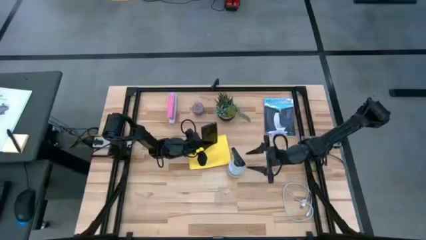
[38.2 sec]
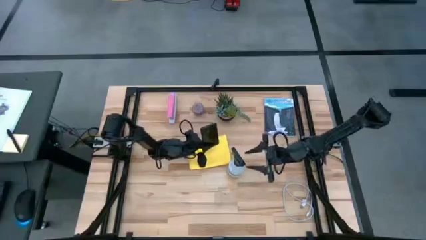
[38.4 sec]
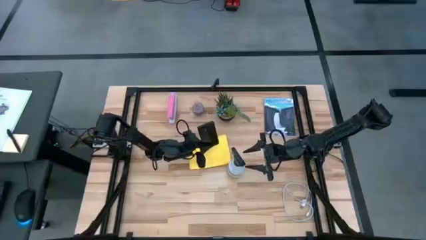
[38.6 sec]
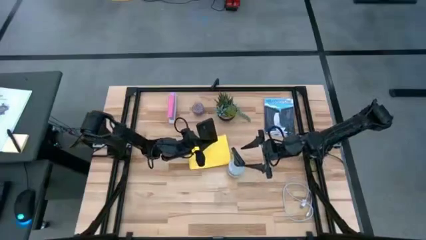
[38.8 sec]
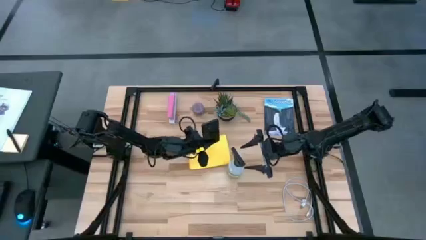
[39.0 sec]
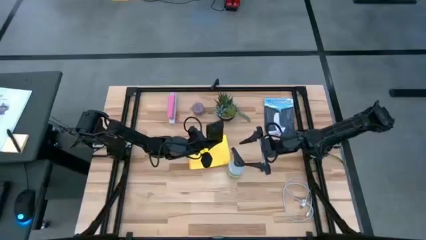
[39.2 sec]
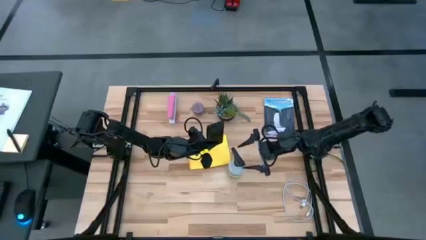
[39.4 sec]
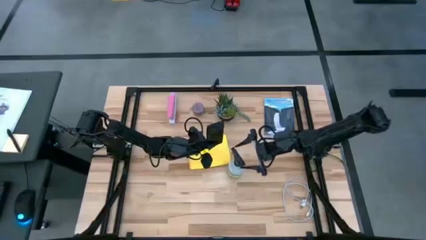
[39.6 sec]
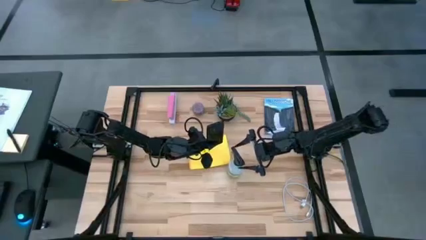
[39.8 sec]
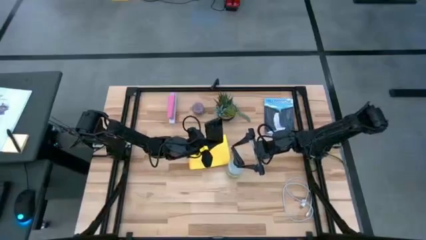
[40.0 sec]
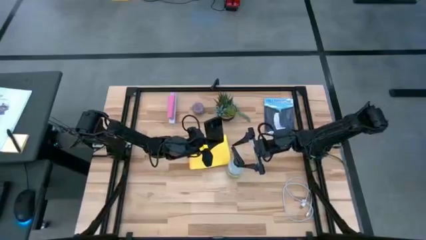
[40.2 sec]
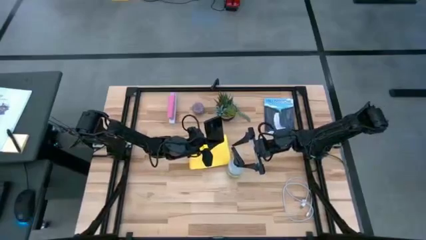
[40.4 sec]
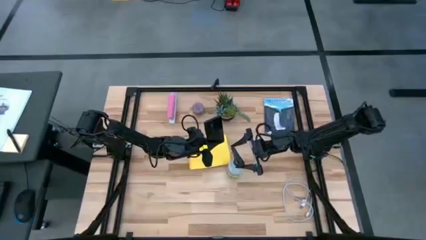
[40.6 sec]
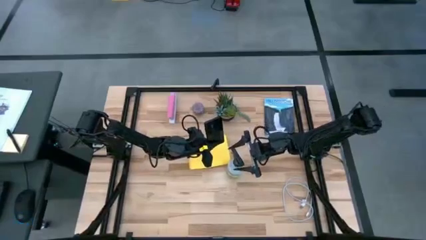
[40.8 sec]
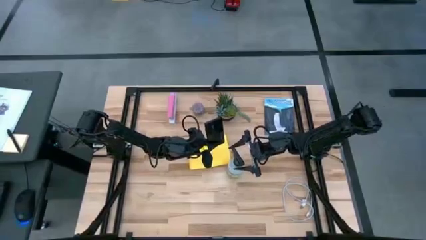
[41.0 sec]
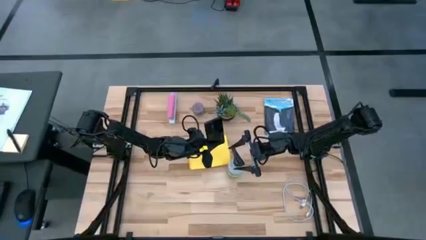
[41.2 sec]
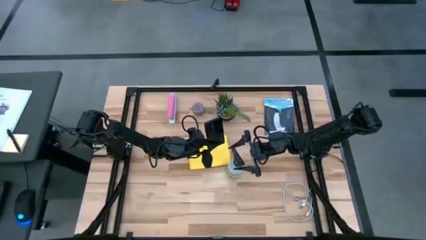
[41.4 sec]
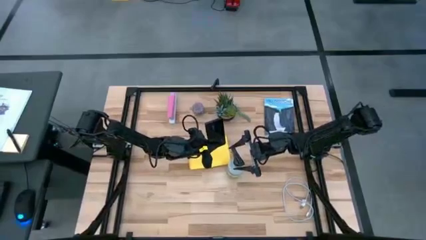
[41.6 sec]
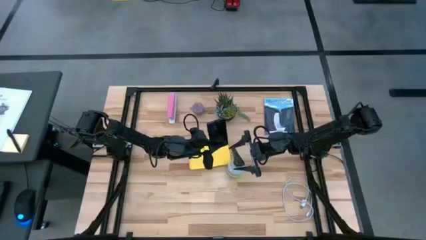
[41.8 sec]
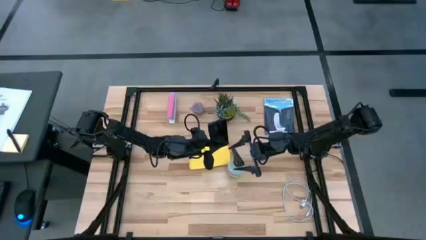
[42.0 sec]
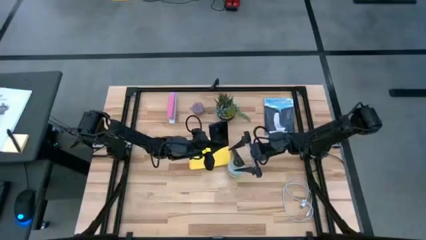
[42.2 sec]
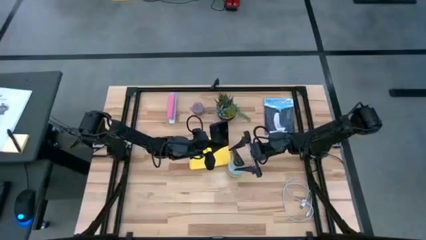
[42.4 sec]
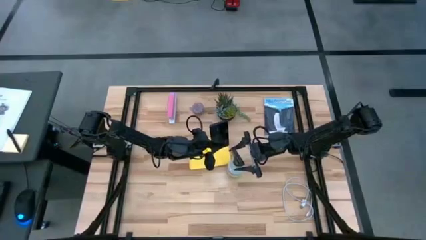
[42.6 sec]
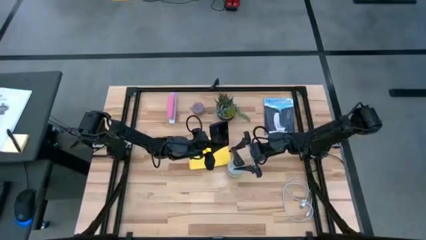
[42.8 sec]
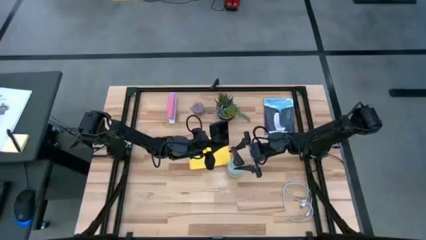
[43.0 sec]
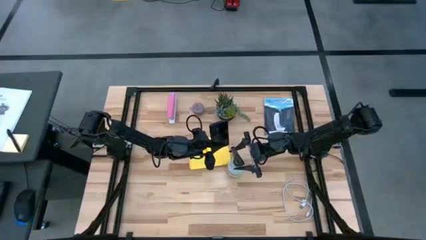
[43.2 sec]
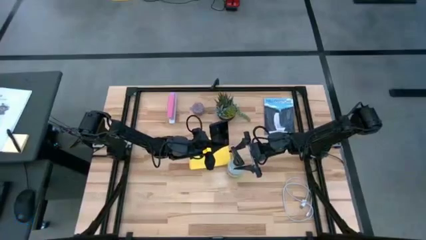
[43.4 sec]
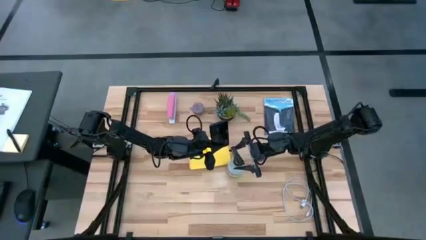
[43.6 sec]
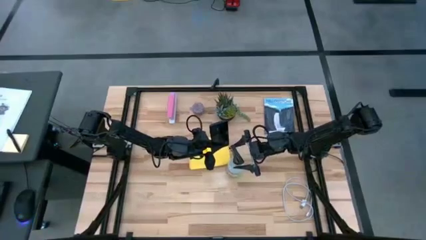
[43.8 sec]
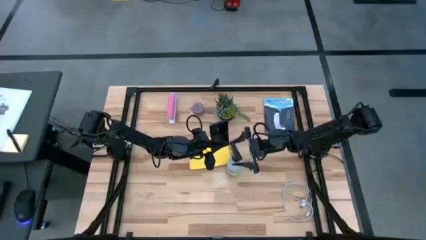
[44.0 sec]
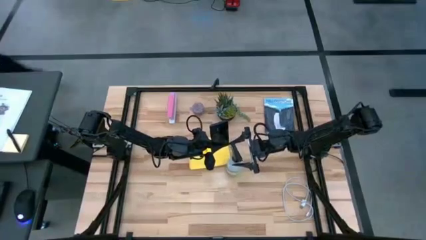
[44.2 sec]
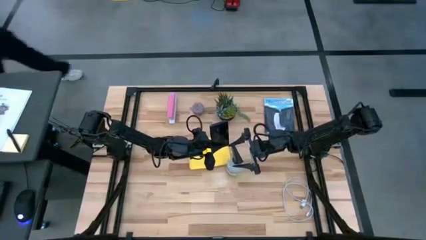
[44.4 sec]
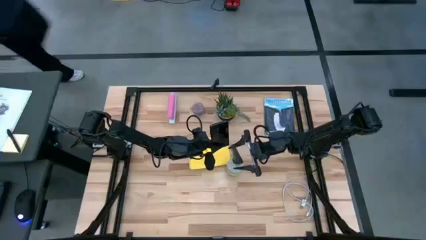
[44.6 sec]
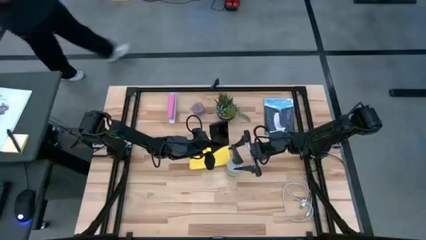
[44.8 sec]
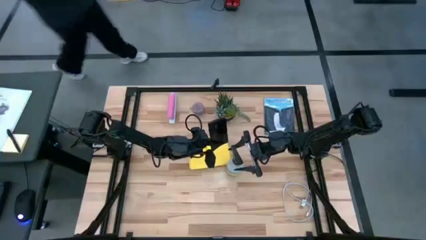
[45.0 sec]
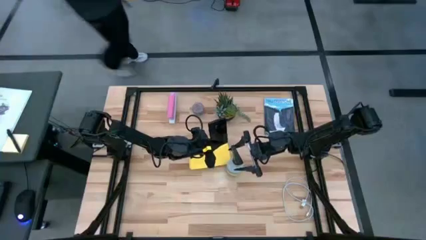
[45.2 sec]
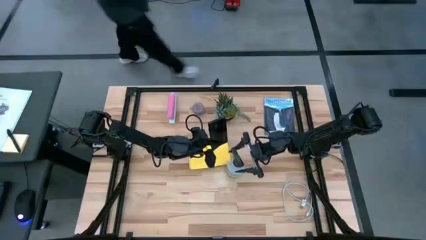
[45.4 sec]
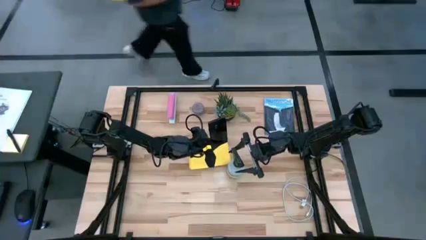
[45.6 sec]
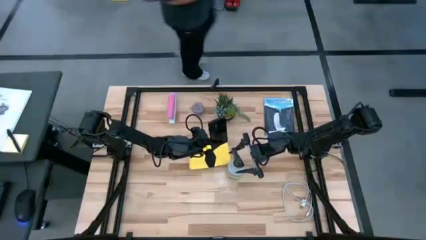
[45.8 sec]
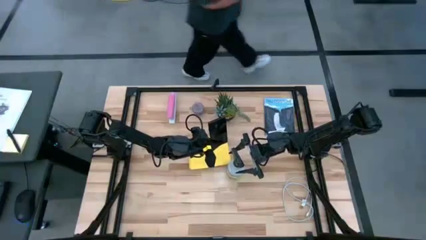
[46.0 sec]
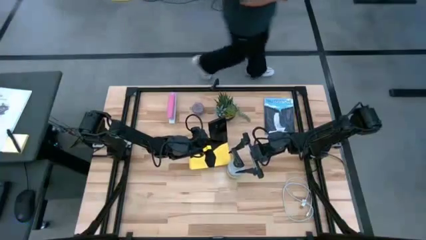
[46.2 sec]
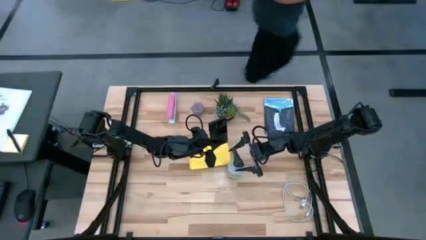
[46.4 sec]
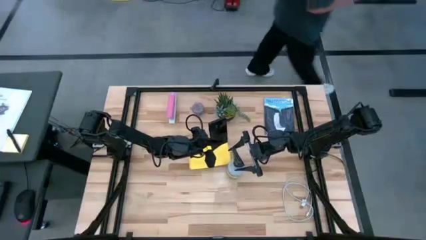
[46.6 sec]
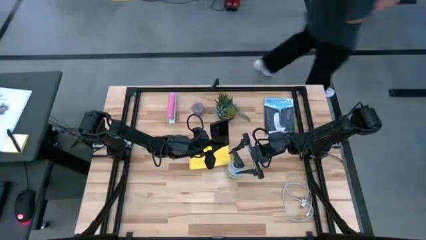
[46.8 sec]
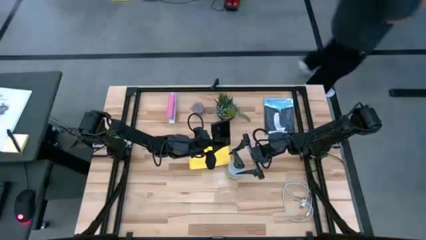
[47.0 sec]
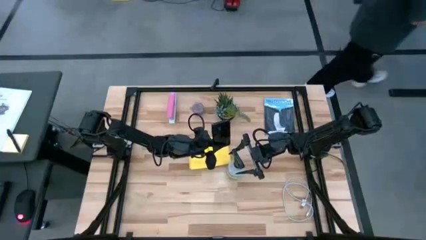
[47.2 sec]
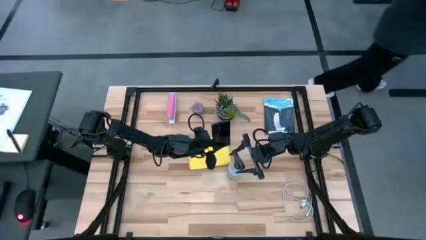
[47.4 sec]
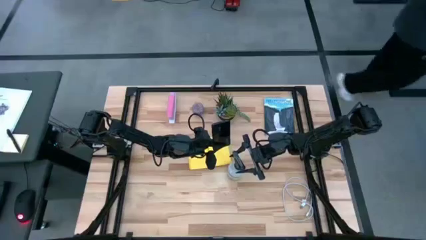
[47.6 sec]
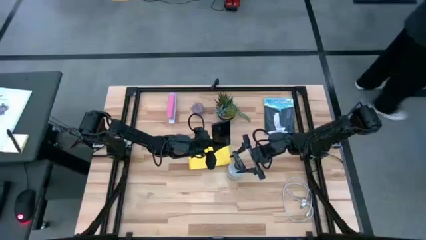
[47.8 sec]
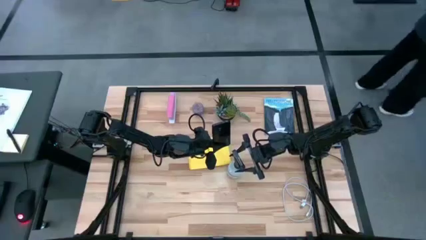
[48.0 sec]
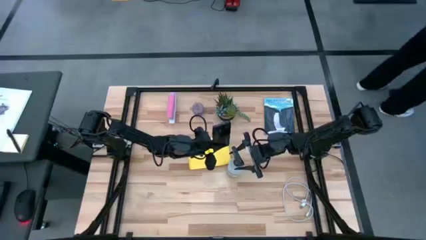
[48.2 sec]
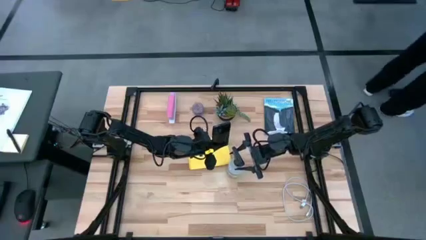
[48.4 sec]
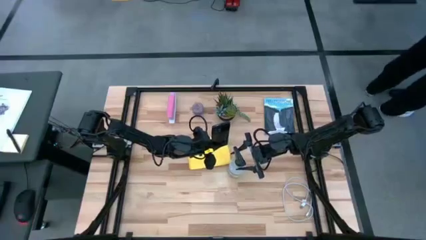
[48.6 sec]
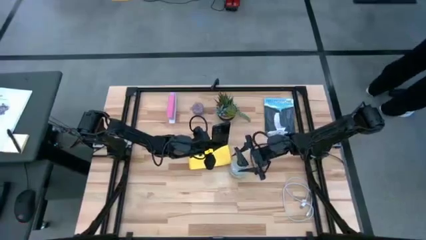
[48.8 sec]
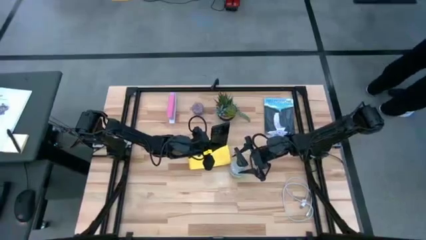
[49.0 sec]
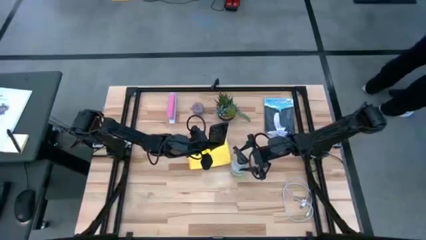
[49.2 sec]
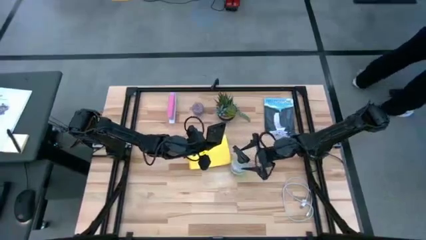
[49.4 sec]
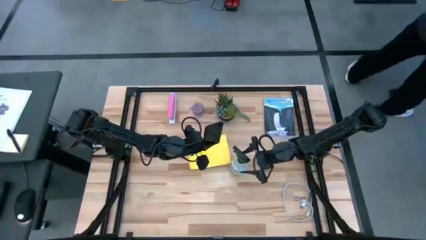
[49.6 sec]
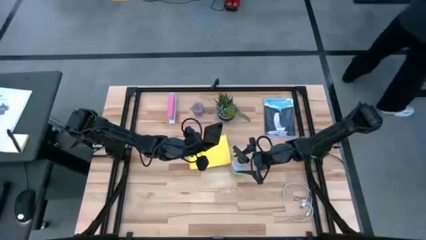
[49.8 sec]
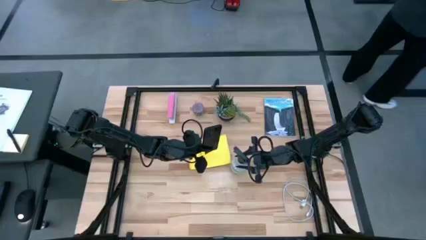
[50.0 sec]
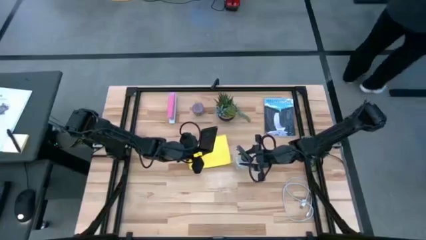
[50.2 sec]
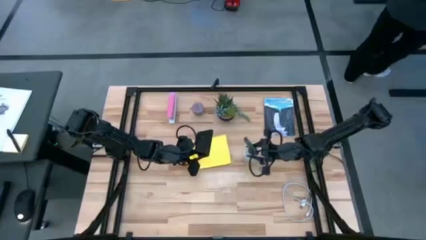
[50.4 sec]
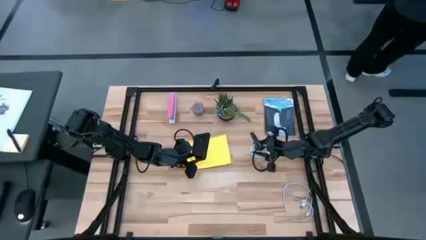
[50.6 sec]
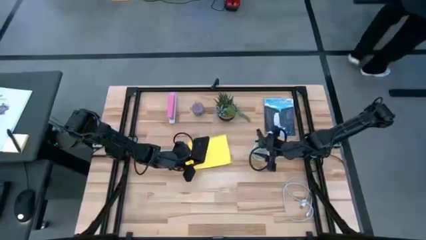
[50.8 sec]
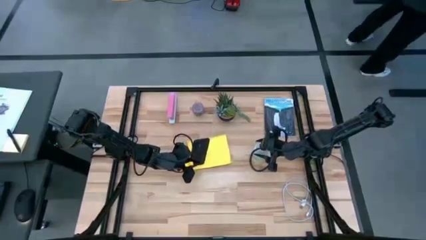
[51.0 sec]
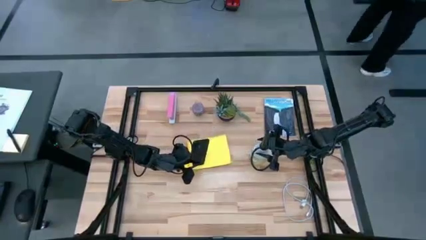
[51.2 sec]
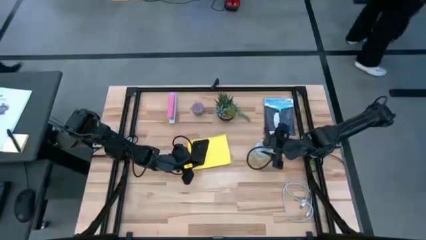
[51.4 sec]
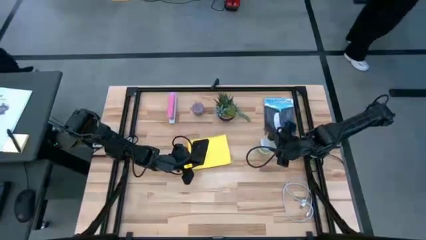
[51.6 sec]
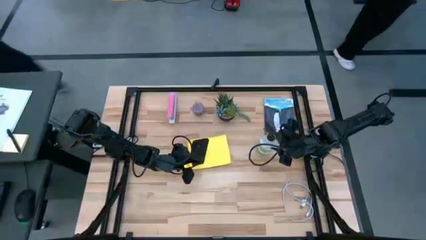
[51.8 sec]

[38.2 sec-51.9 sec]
Task: Apply microfiber cloth
Spray the back of the cellphone with the spray bottle

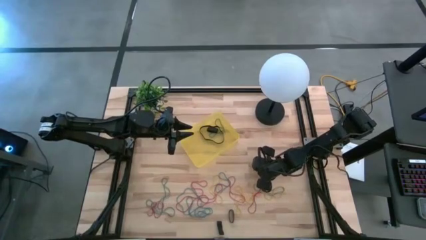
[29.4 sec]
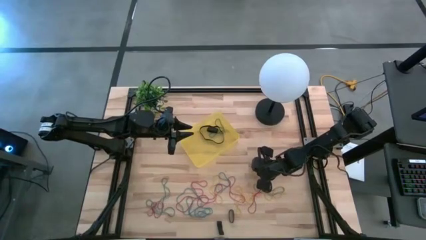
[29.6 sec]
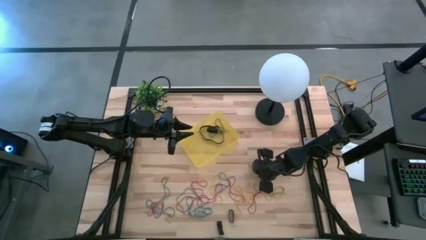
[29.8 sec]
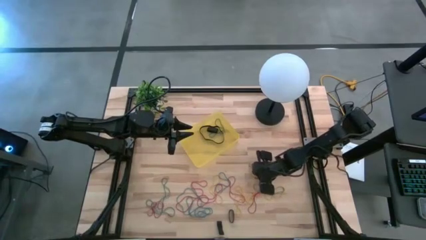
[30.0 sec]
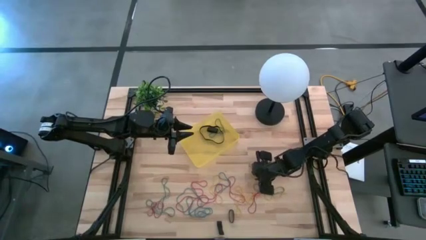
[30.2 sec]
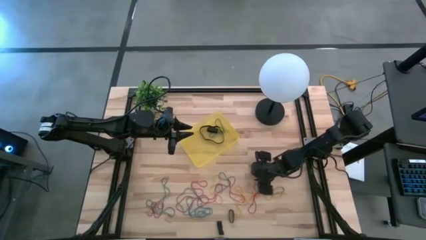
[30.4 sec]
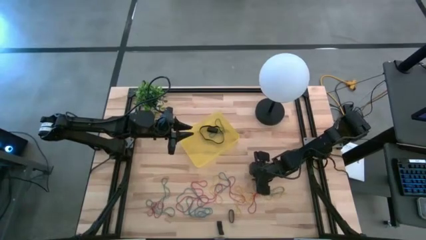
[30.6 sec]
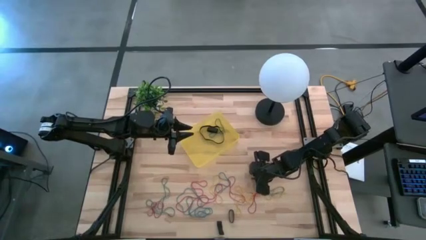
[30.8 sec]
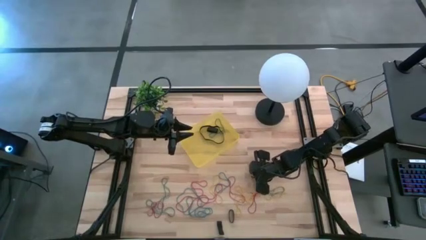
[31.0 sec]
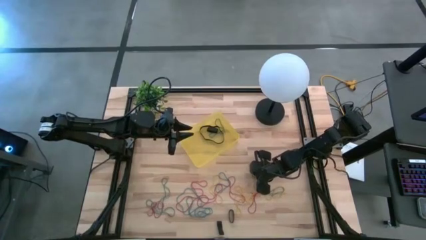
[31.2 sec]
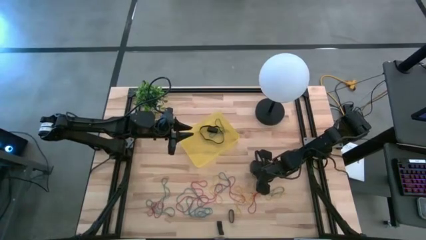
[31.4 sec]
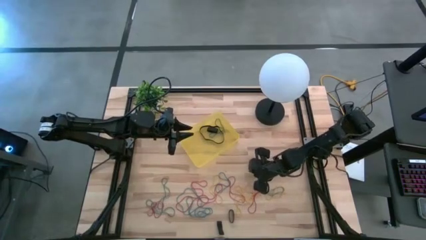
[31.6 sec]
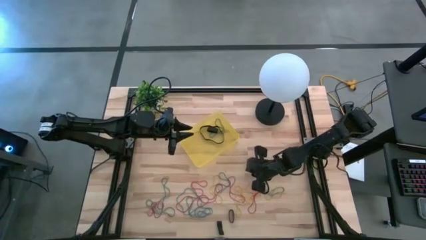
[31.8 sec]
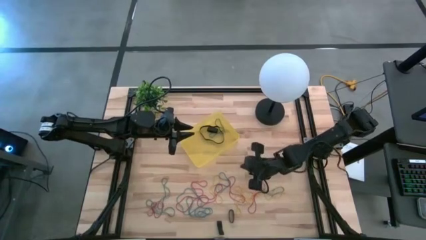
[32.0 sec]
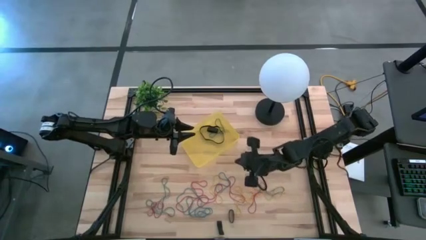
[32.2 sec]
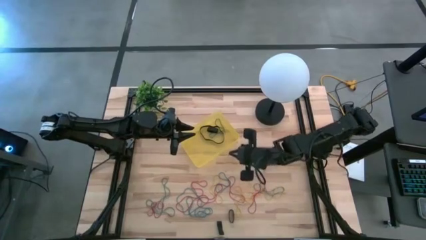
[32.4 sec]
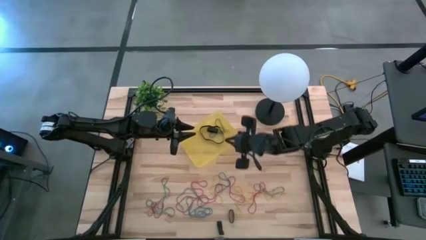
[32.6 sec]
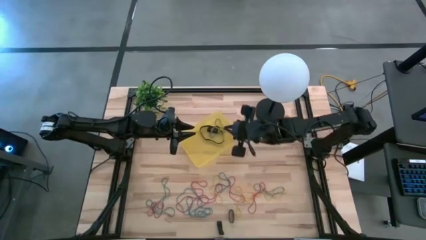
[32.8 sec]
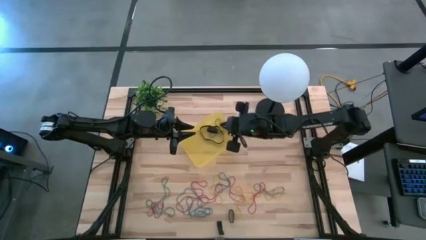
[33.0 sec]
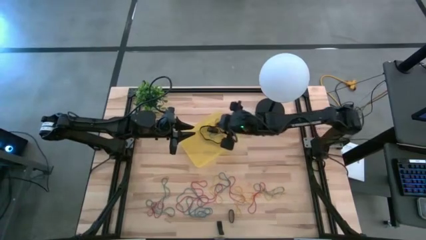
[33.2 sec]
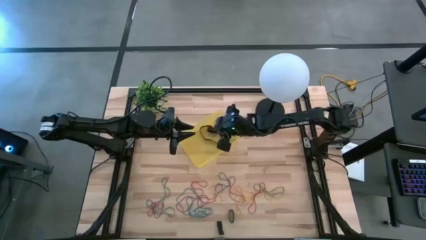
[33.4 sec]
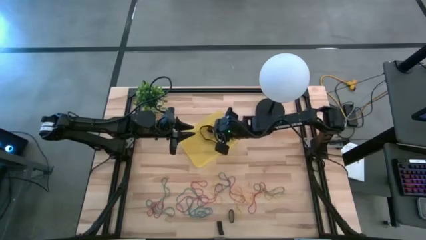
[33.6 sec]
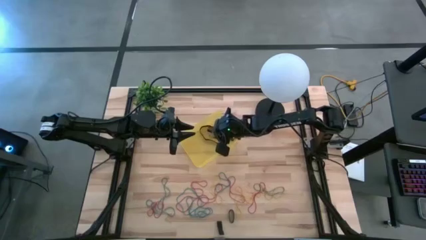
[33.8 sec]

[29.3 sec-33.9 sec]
Task: Pick and place rubber bands into bin
Put the yellow rubber band into the yellow bin
